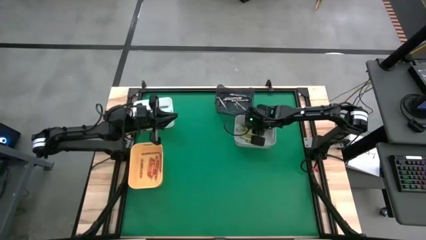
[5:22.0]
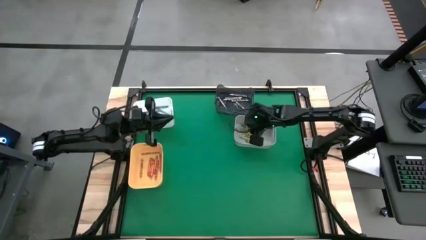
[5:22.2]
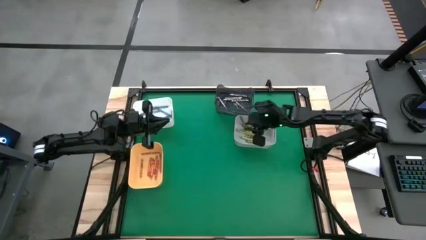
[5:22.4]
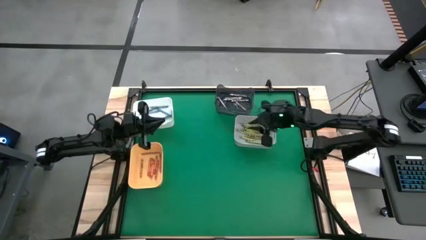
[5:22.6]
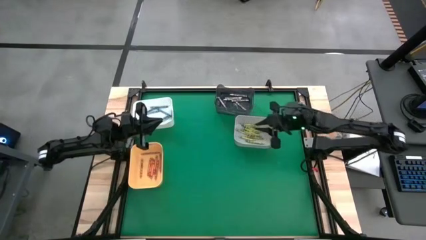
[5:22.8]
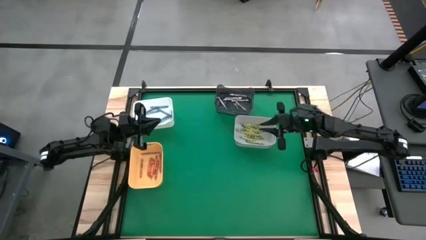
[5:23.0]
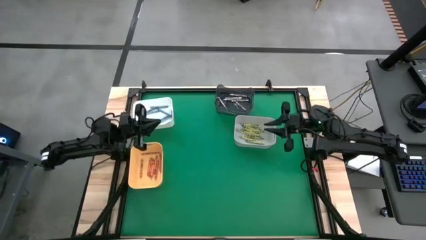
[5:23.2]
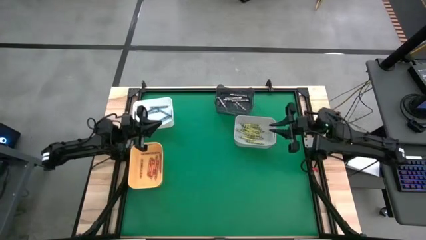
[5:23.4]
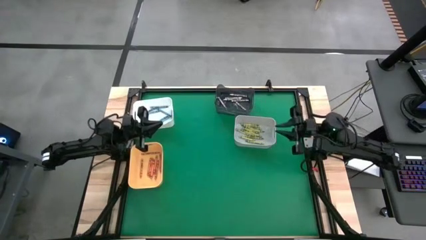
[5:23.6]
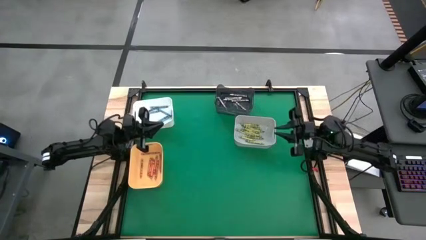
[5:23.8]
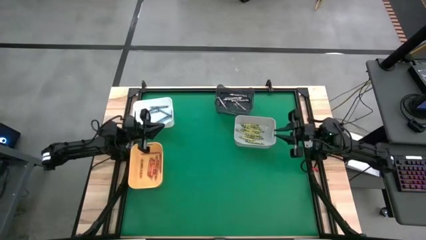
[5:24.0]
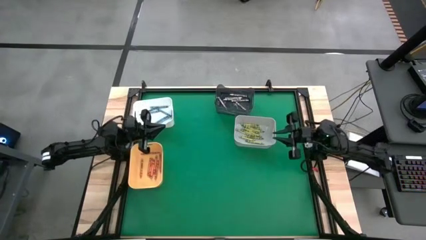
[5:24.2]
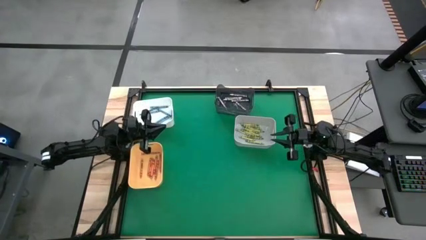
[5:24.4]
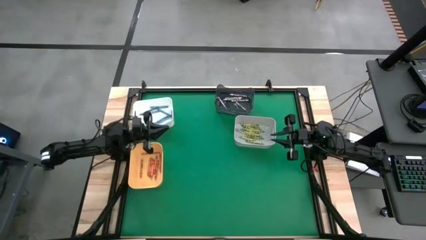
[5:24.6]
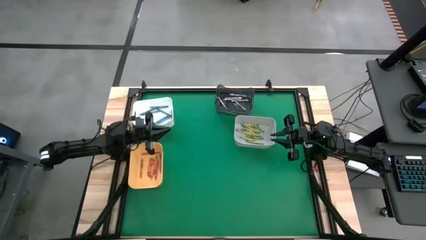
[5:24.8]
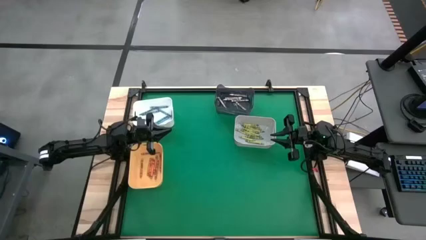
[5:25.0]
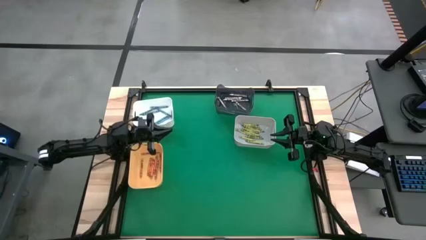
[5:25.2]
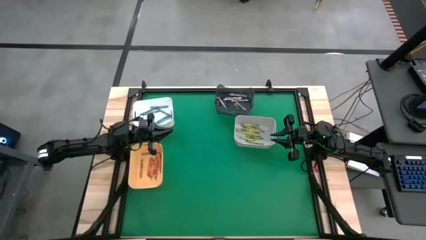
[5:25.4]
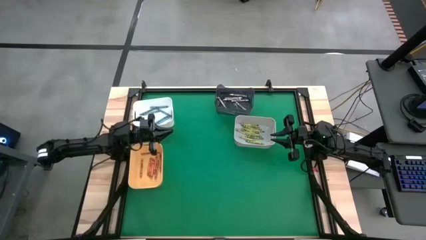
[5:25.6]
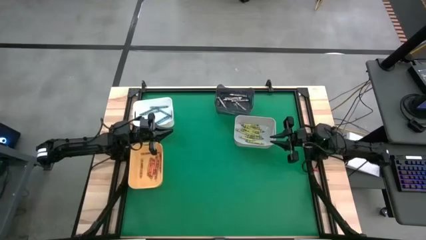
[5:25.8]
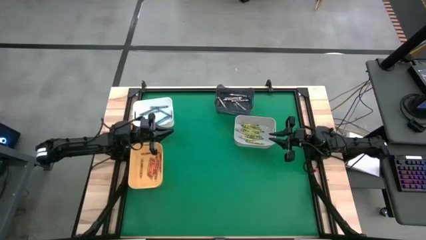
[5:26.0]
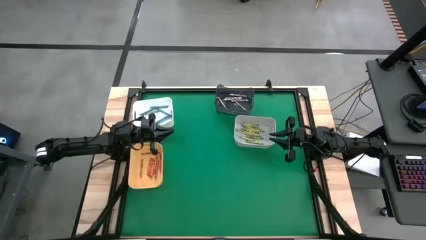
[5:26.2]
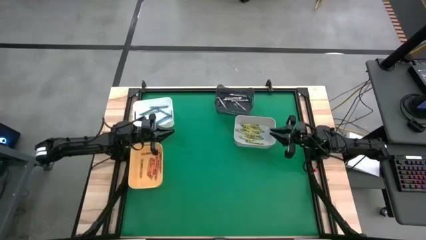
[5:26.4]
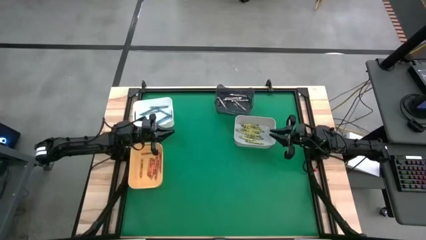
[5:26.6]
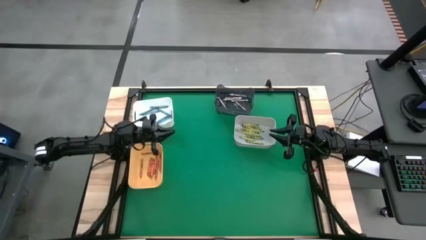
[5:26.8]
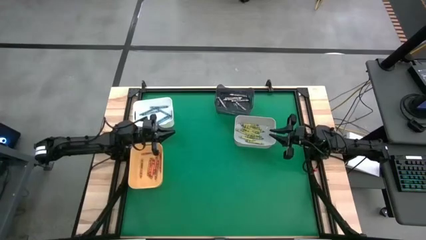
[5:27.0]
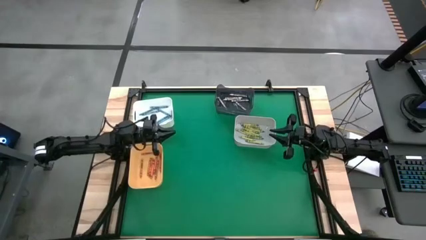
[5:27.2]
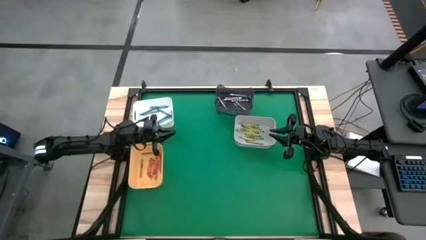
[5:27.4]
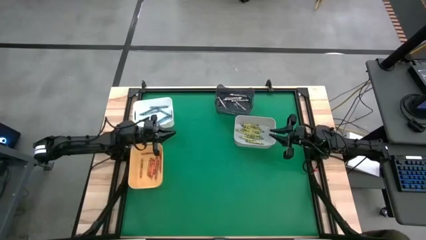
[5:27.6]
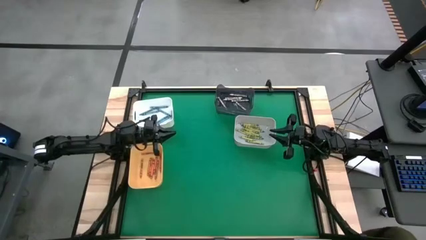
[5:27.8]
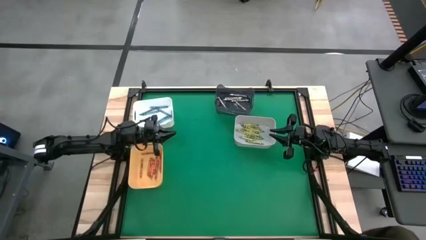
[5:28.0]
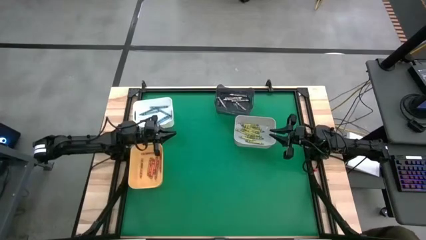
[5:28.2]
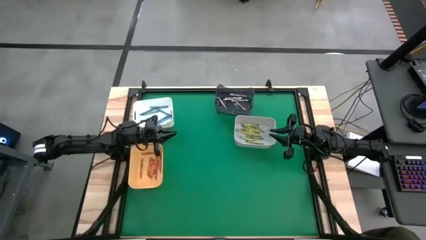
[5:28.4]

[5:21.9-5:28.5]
Task: Sort crayons
Return to Home Position

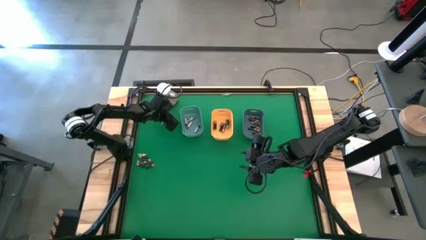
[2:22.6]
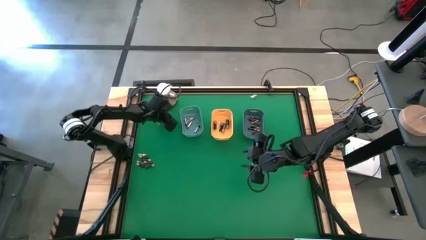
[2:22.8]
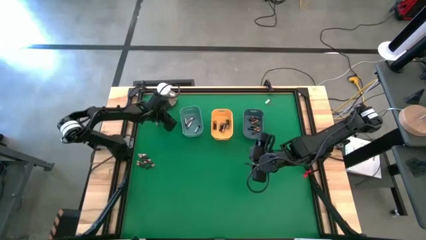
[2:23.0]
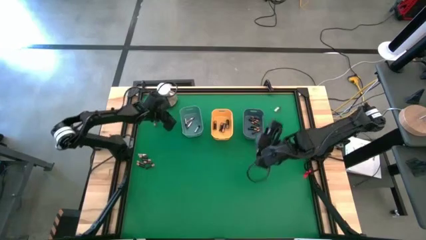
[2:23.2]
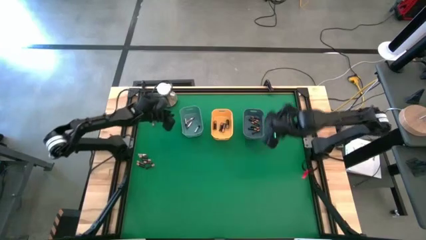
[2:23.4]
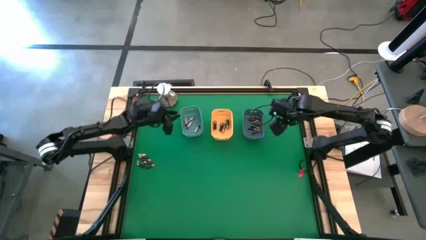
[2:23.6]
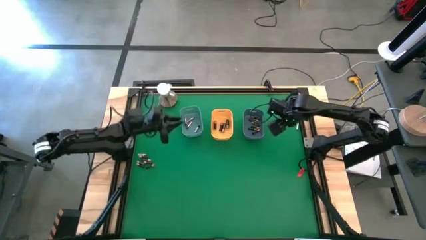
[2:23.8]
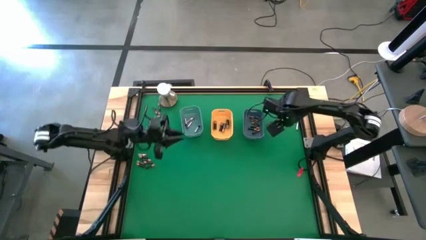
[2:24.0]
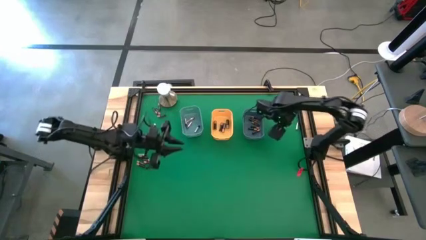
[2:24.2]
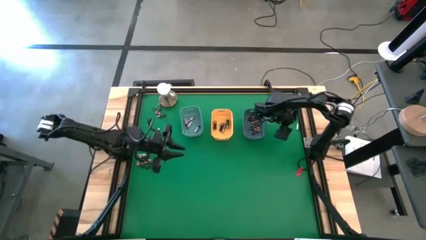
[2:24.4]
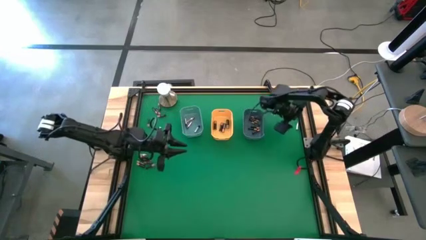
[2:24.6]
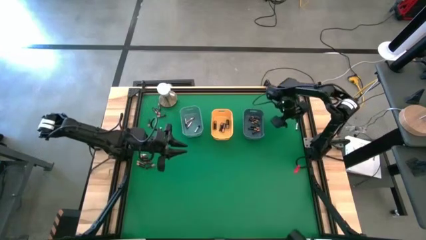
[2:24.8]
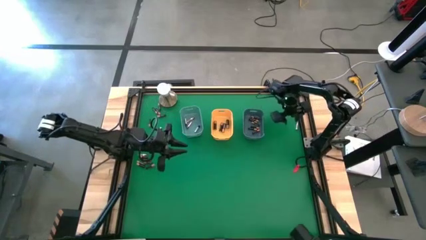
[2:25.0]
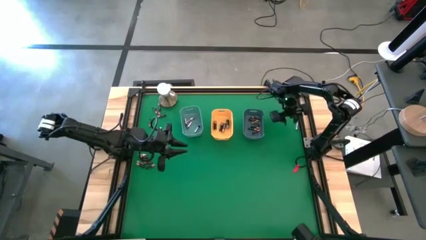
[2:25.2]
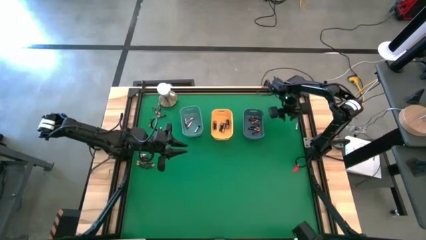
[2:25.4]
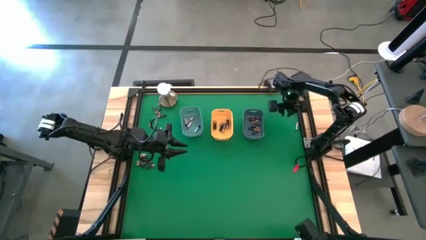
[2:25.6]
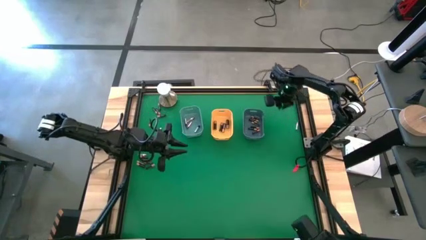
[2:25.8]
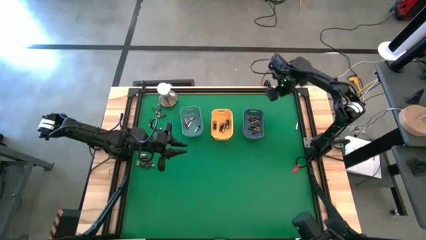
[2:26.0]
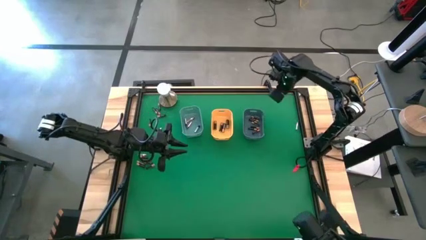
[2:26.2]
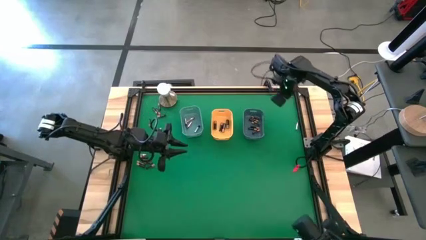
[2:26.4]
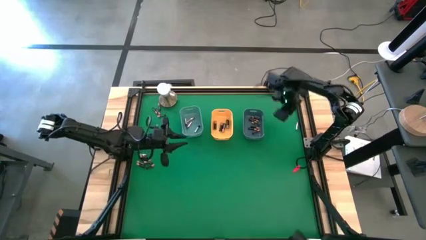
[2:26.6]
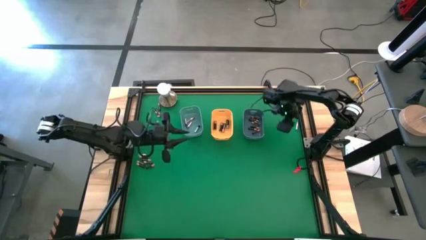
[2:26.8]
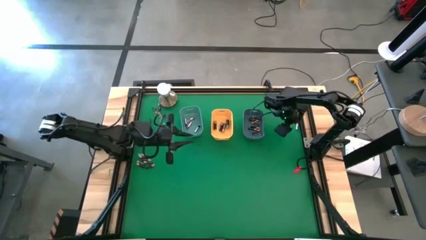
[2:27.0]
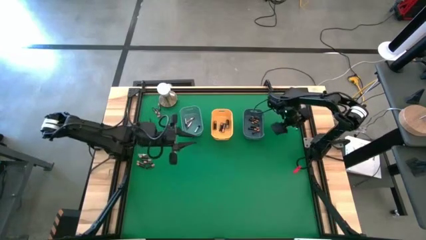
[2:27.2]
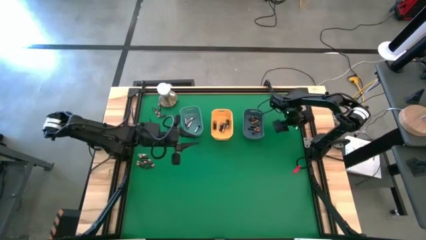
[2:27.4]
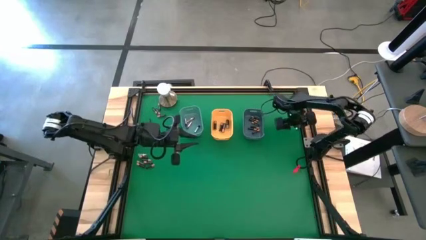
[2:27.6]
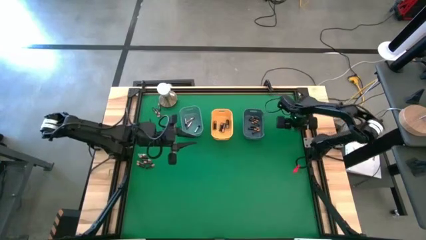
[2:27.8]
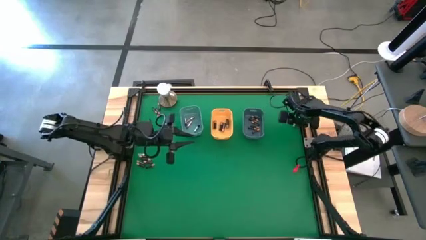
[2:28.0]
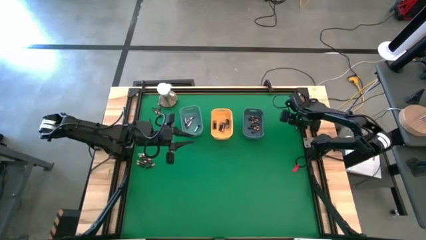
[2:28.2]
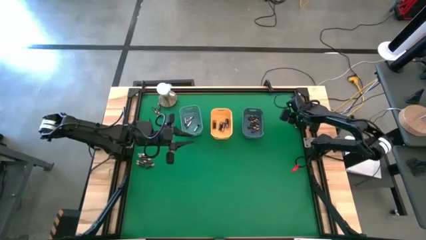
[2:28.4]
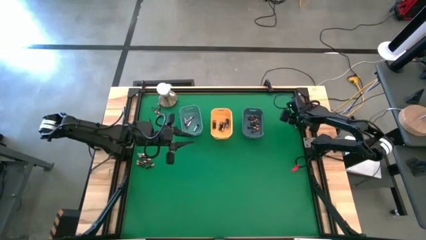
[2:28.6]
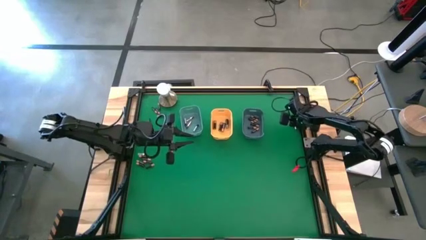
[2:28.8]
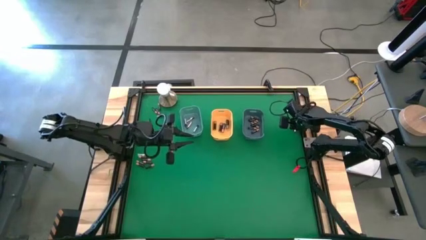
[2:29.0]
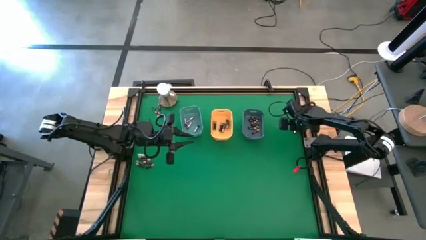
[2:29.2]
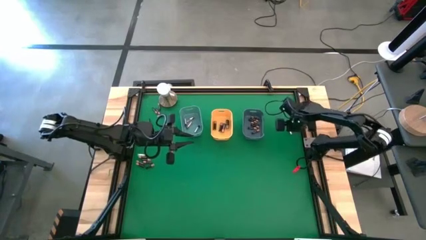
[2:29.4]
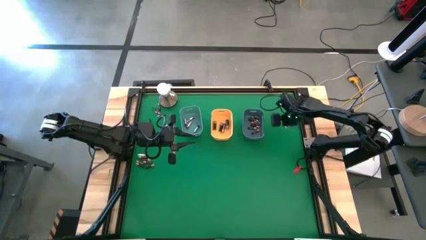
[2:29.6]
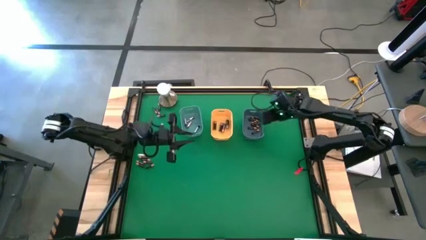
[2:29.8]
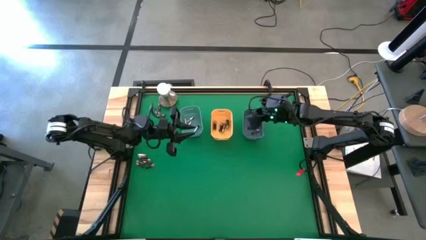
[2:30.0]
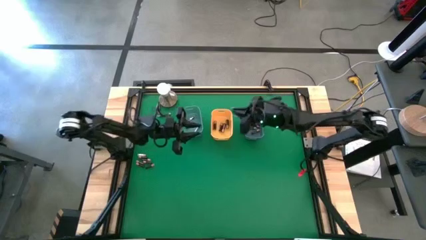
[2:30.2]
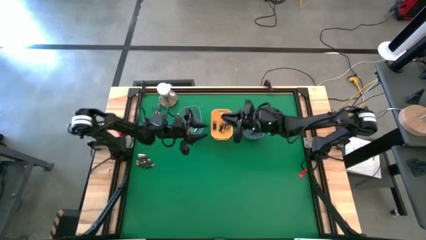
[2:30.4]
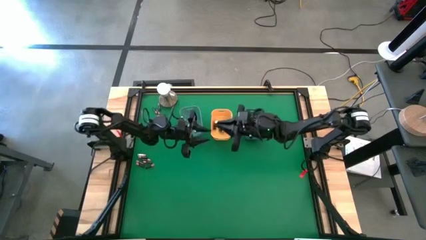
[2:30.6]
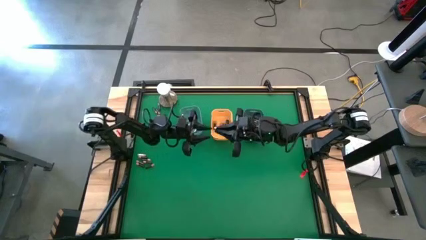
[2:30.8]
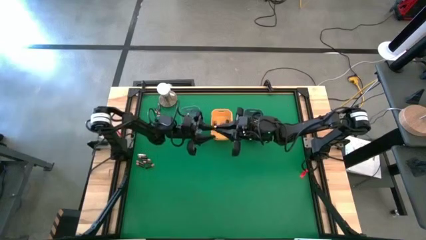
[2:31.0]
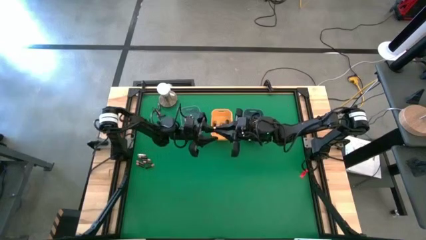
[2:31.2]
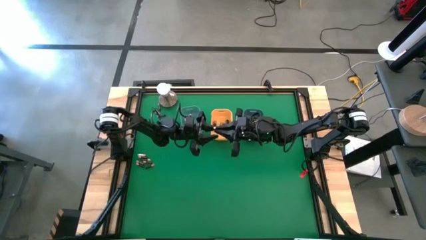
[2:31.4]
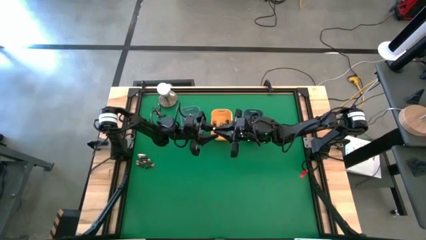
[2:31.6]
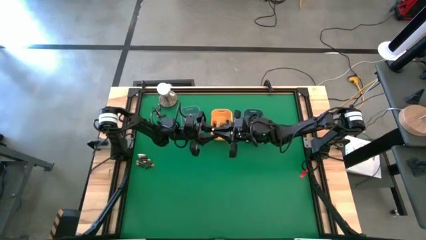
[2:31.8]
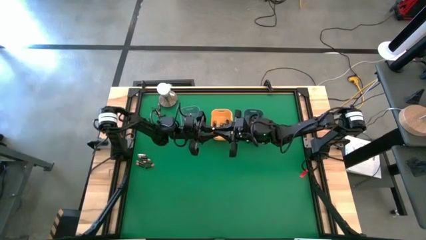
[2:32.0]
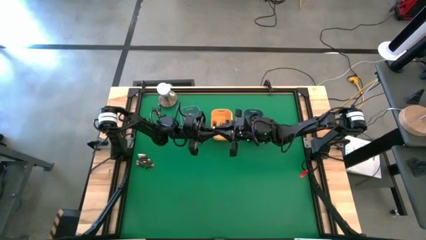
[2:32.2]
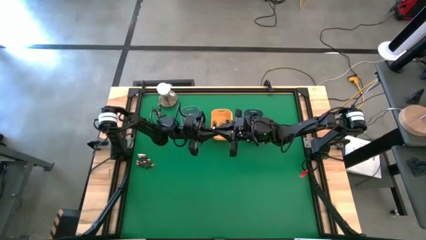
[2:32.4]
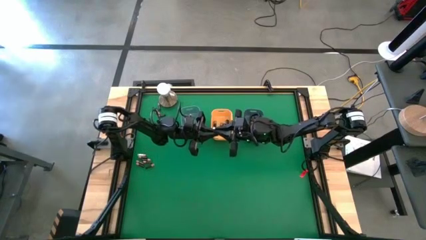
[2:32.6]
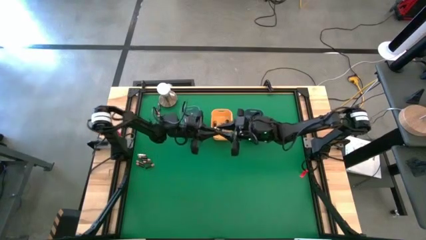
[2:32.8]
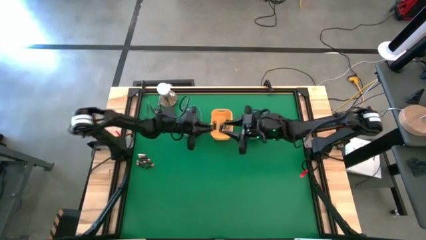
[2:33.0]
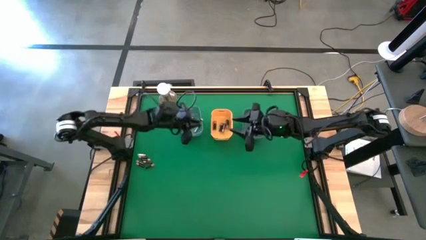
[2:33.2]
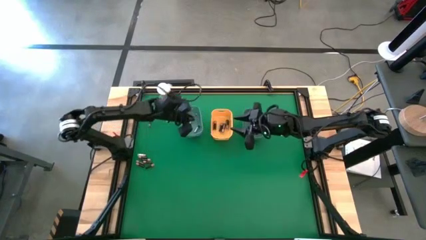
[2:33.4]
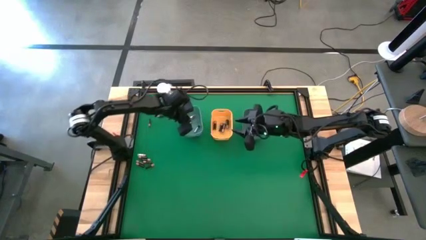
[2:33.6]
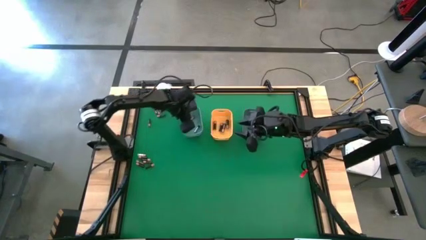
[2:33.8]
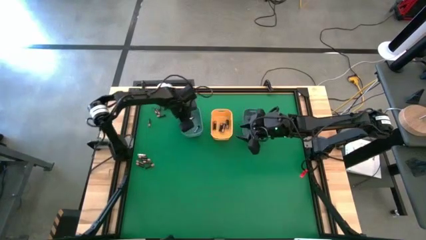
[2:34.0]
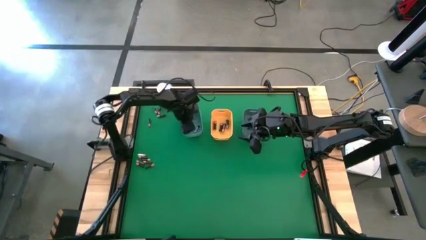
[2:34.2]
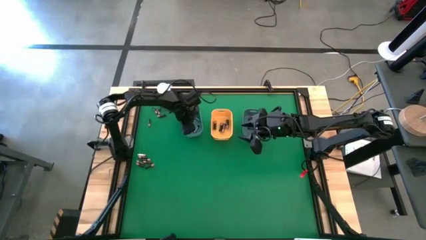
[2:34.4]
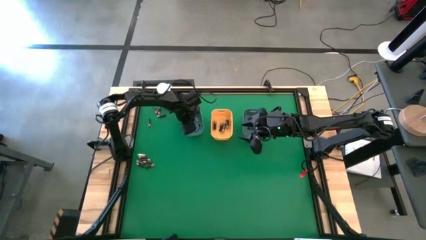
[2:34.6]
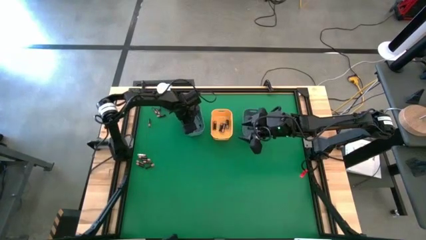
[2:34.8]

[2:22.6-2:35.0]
Task: Sort batteries
Put the silver battery into the green bin
